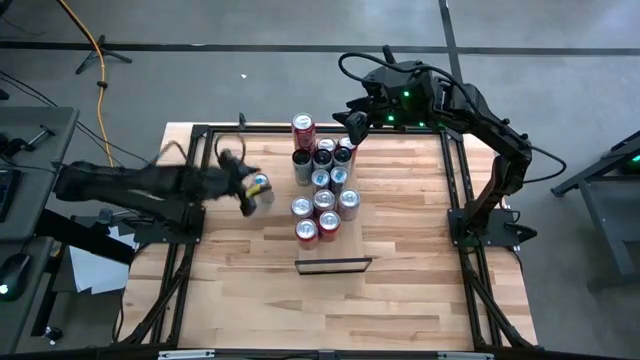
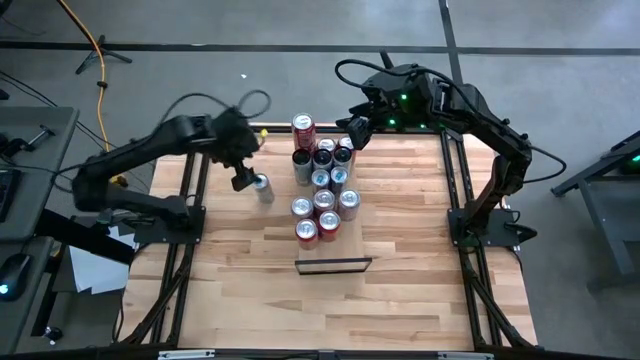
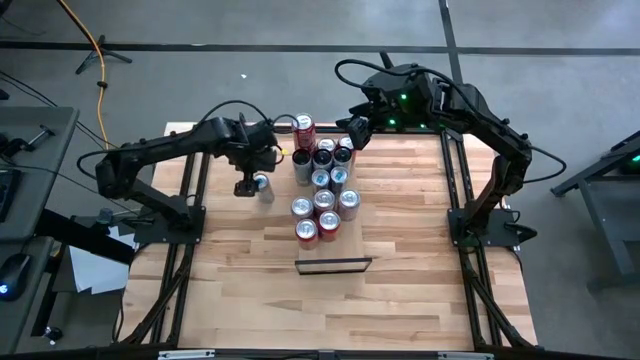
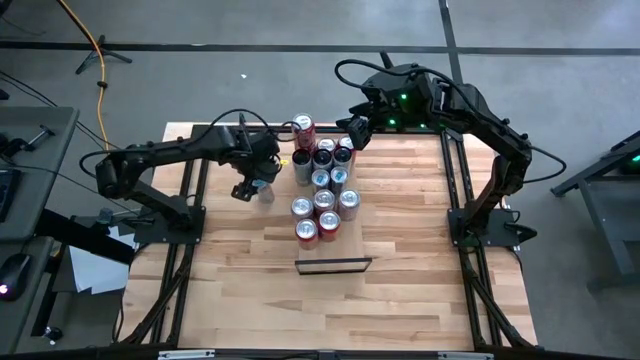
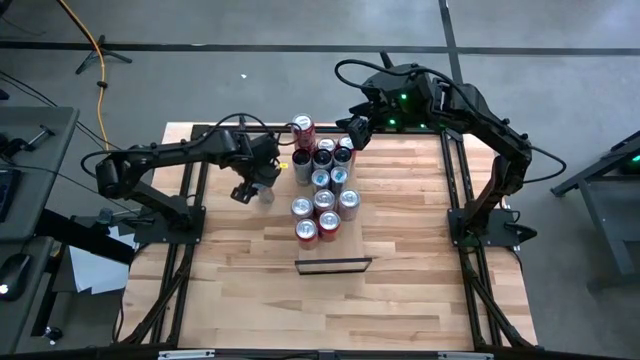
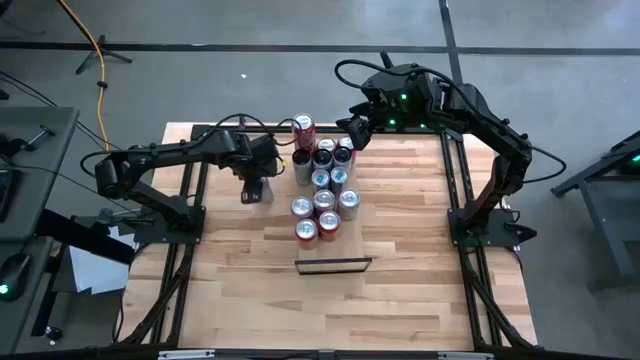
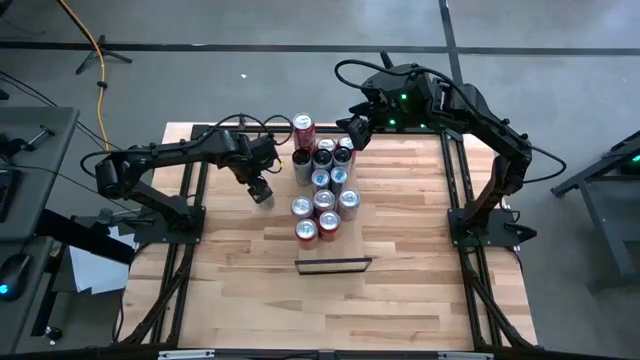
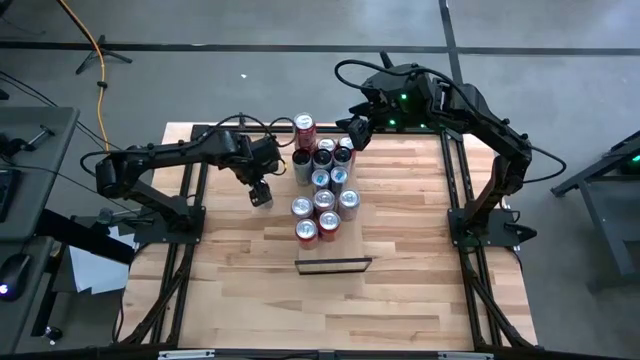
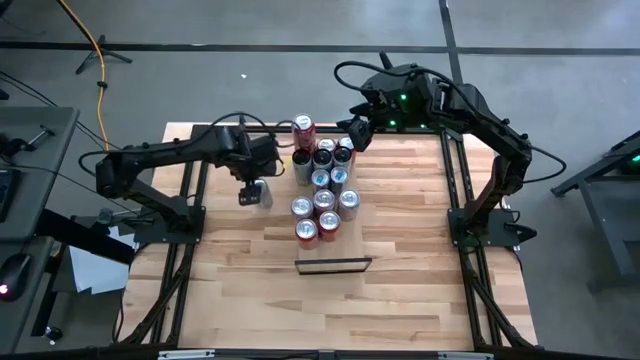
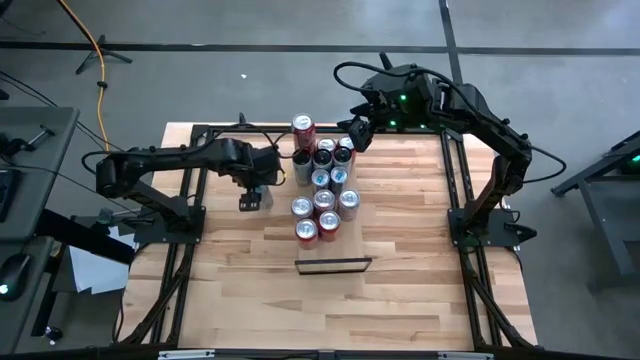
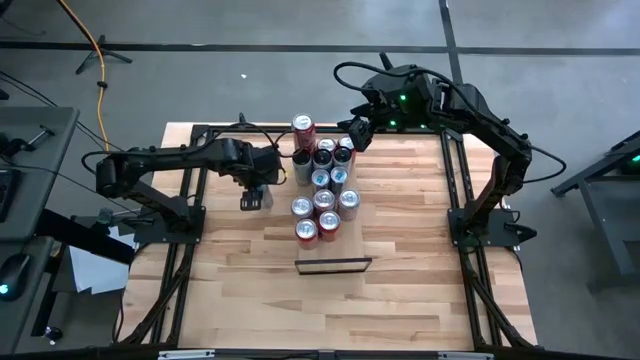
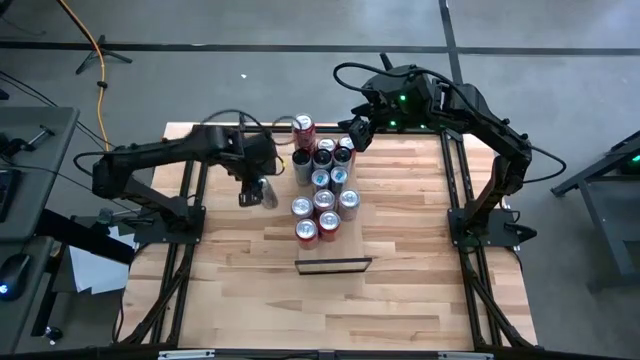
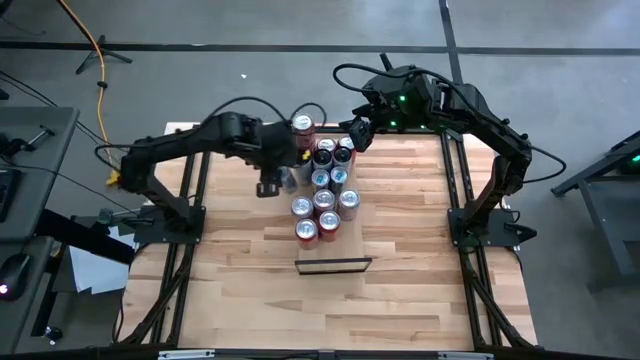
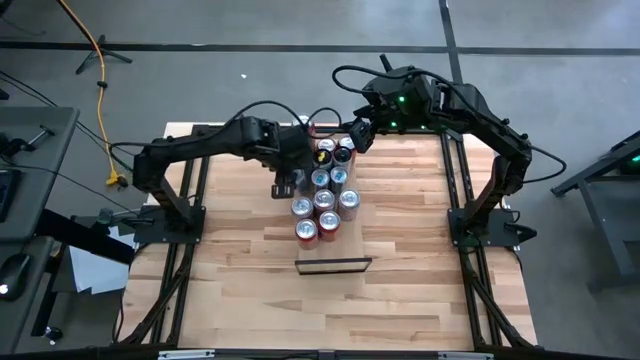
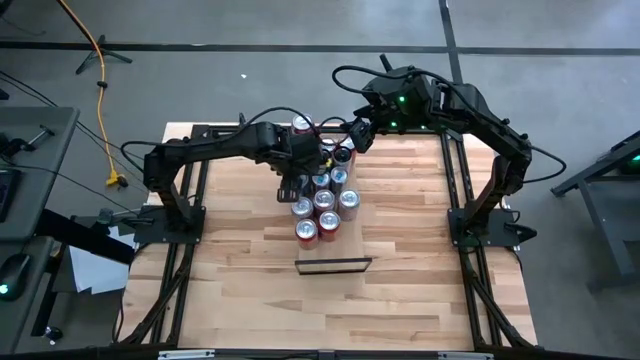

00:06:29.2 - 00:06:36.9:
Task: Place canned beverage on shelf
Put the blue soda can on the shelf aligned with the other blue soda can

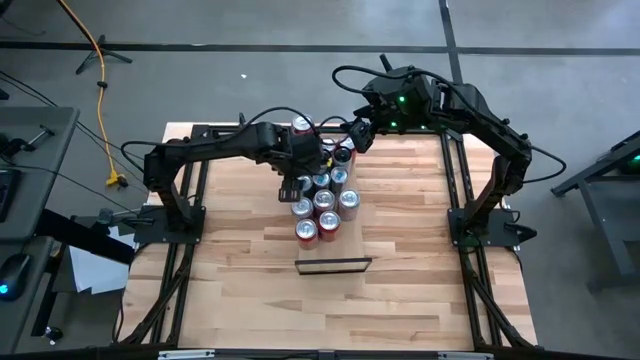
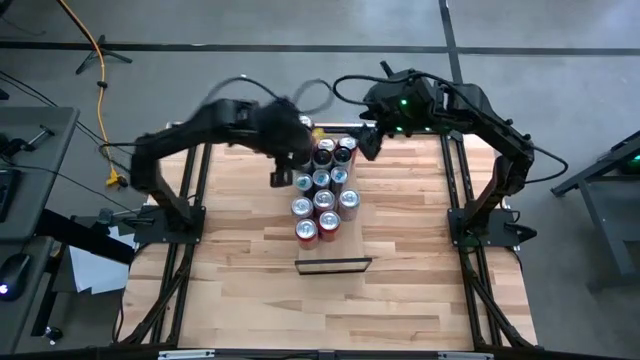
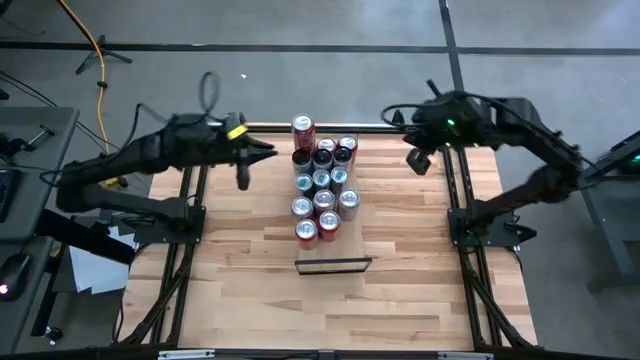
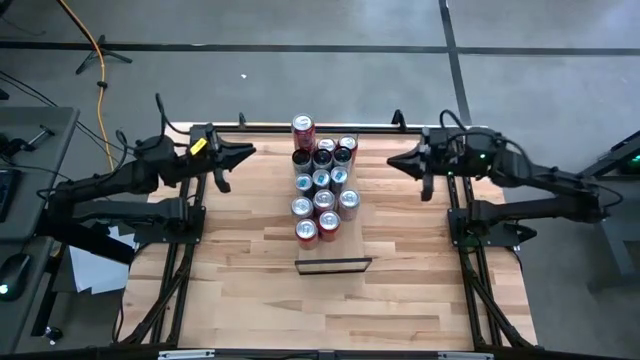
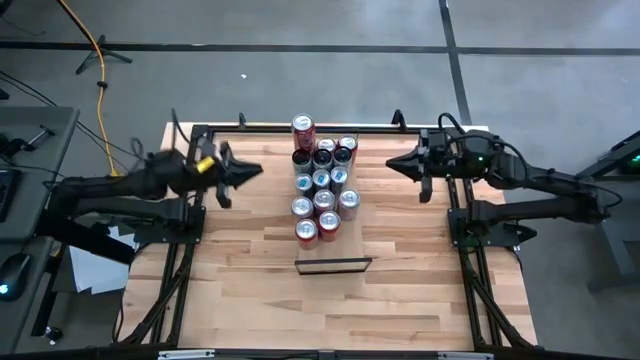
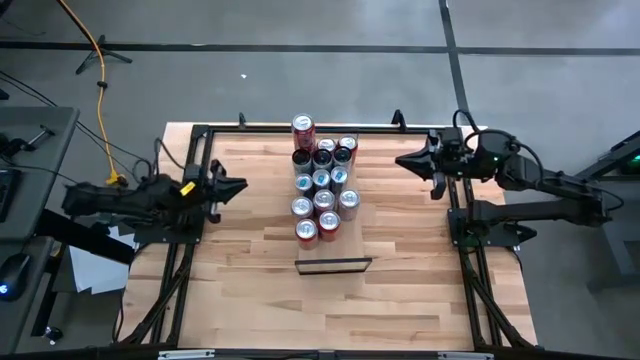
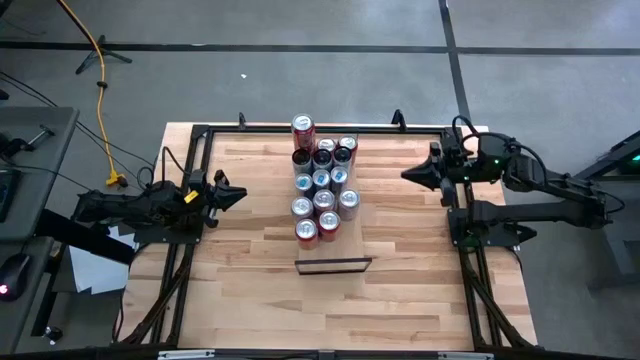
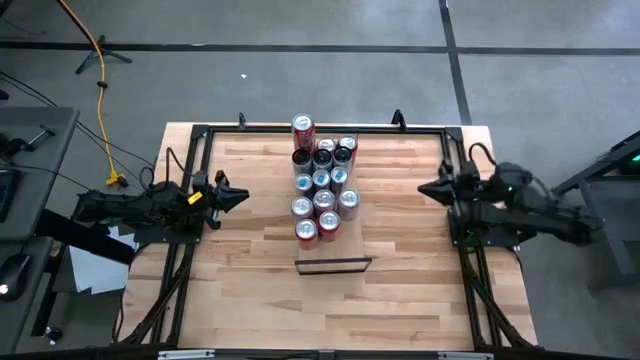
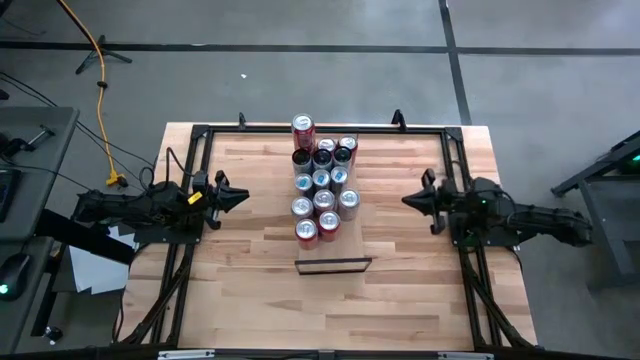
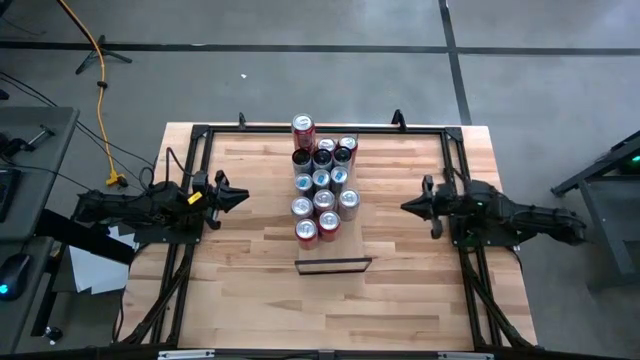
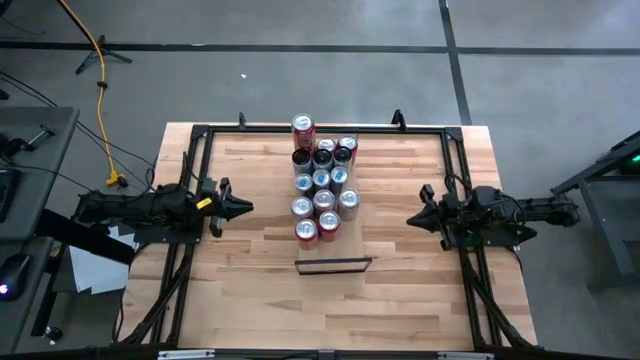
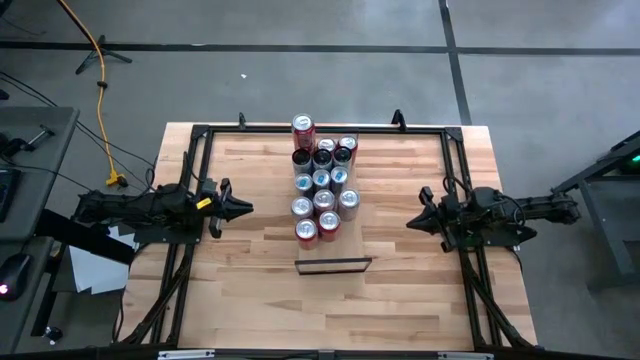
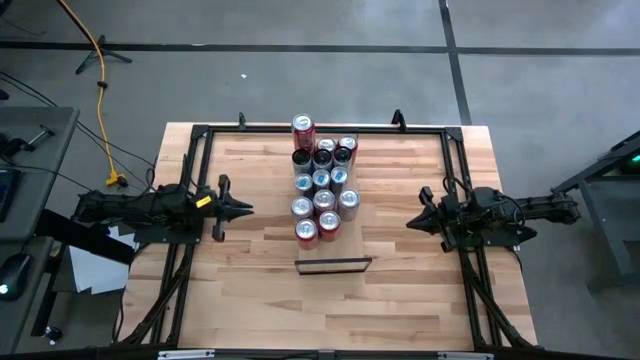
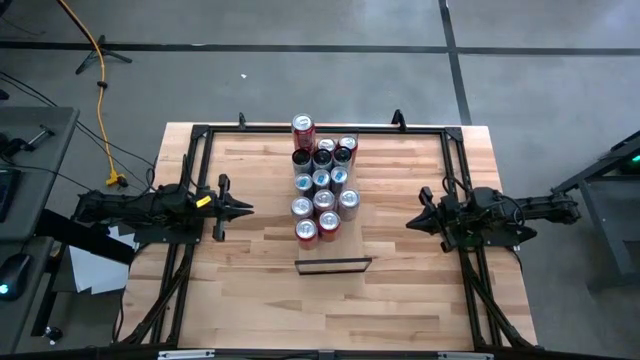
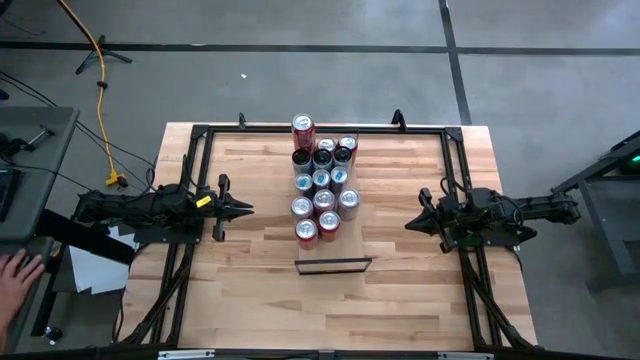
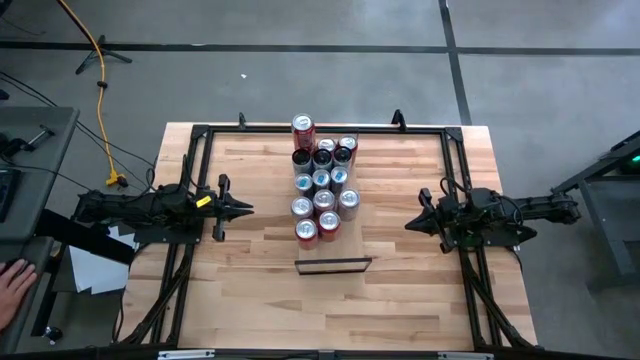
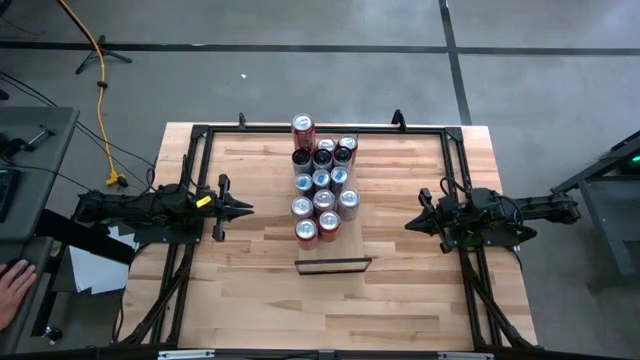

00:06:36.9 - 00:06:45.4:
Return to Home Position

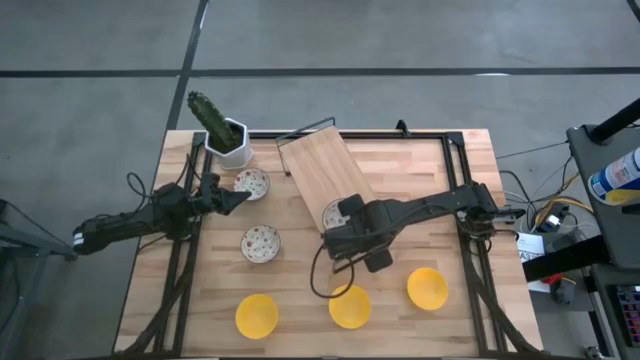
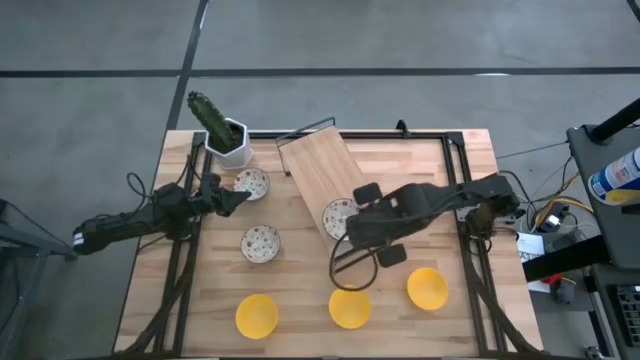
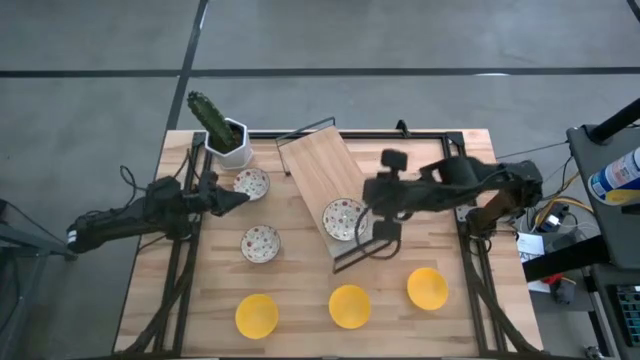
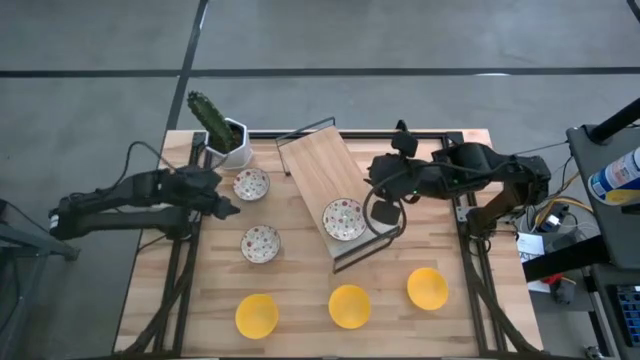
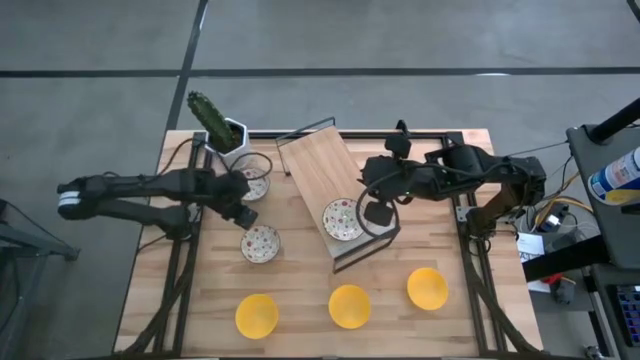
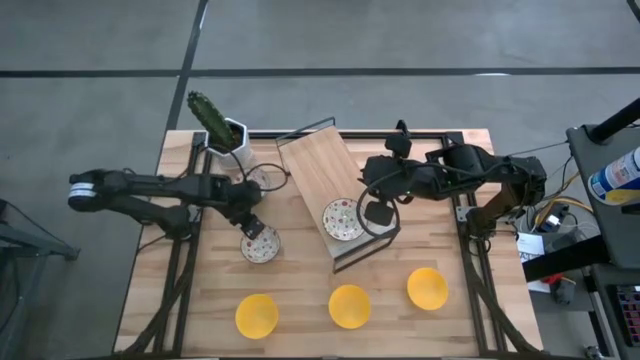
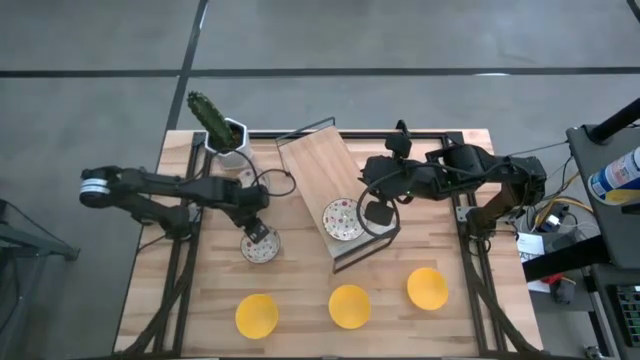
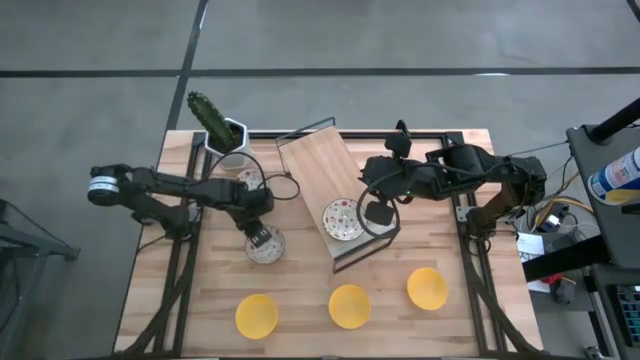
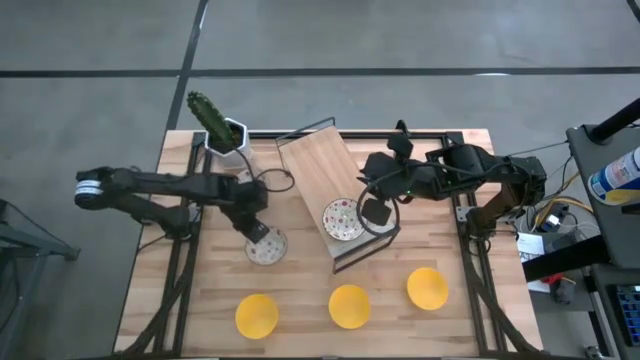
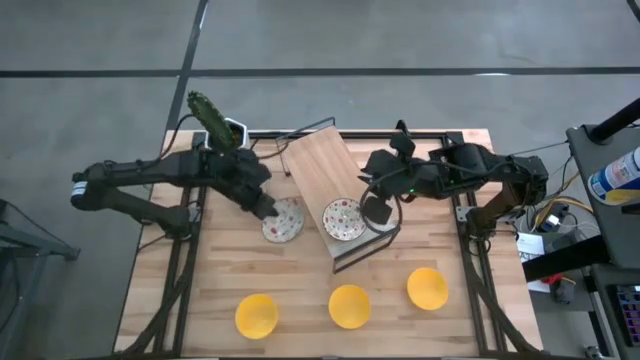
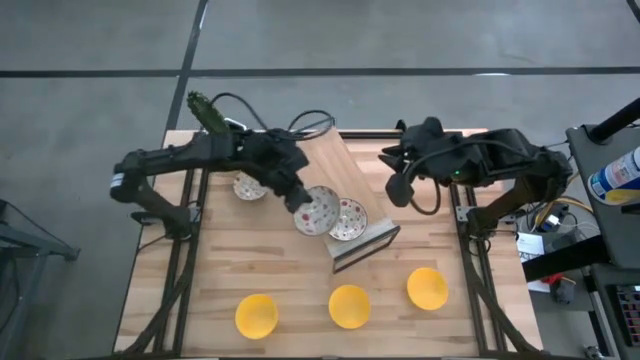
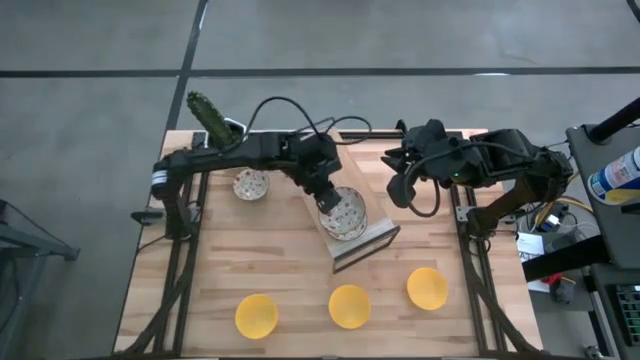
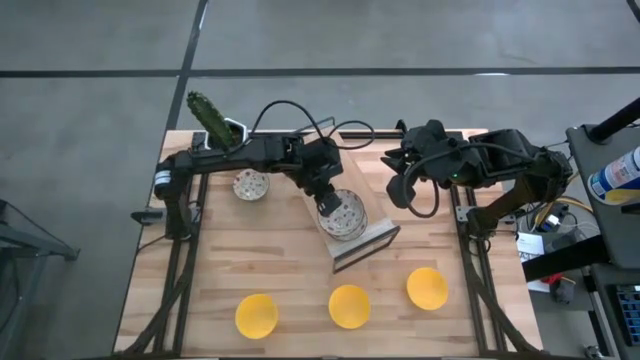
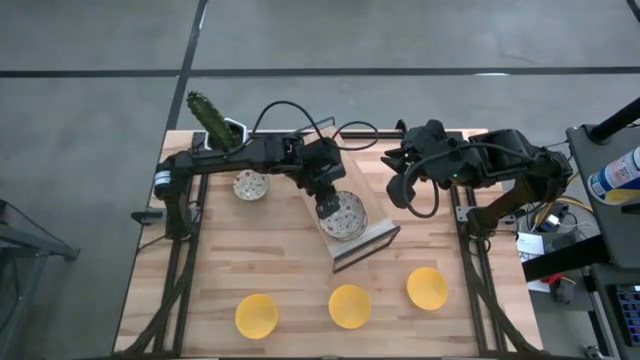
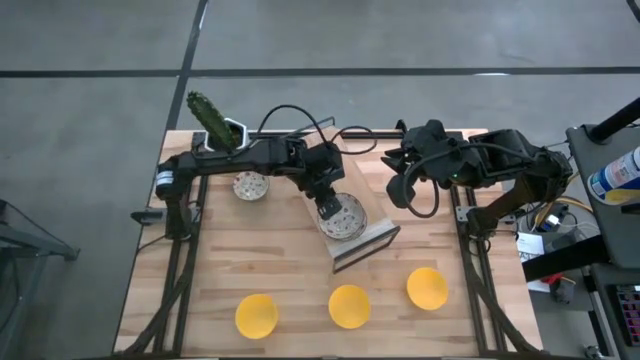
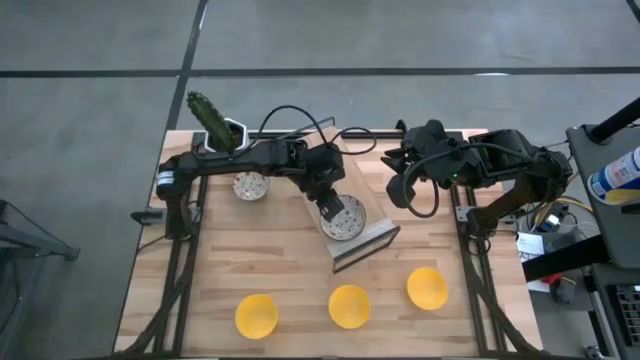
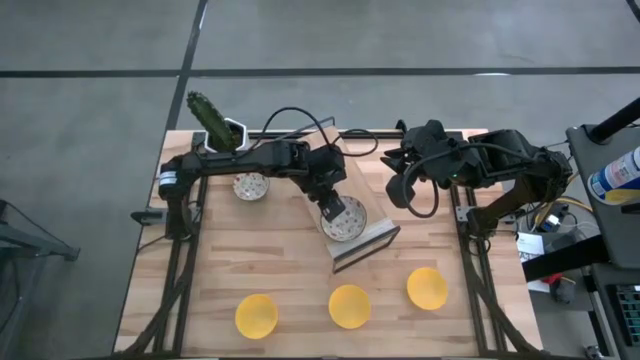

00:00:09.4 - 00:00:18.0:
Task: Pick & Place Mini bowls
Stack the bottom white patterned bowl on the other white patterned bowl on the shelf
